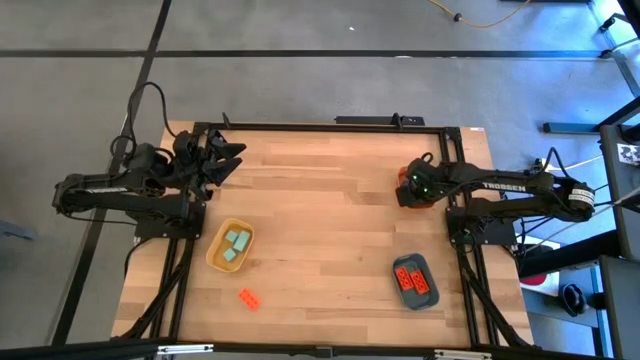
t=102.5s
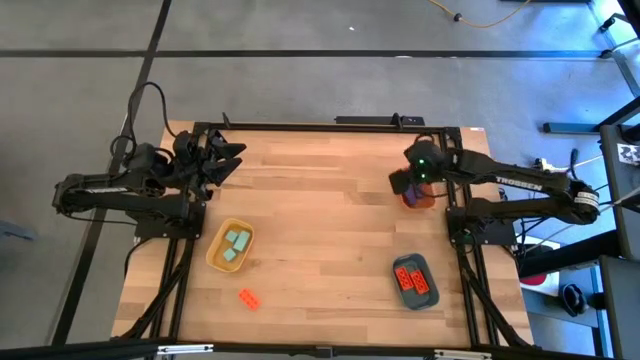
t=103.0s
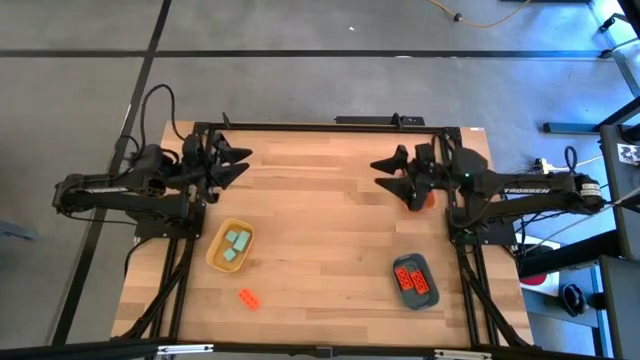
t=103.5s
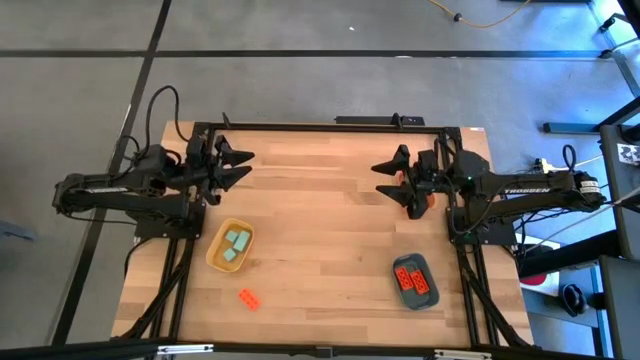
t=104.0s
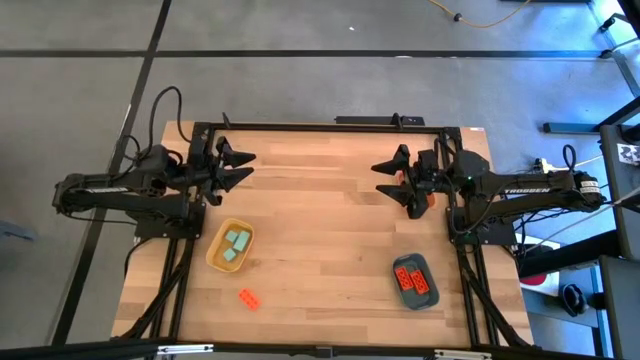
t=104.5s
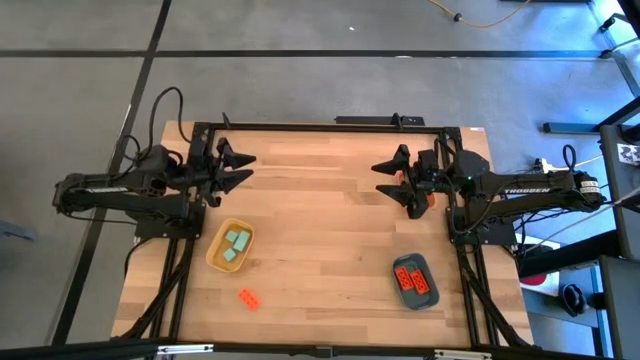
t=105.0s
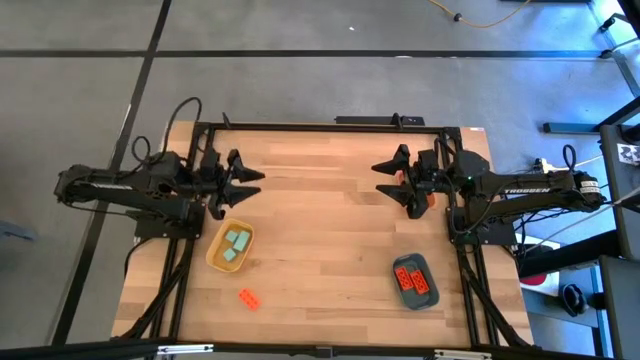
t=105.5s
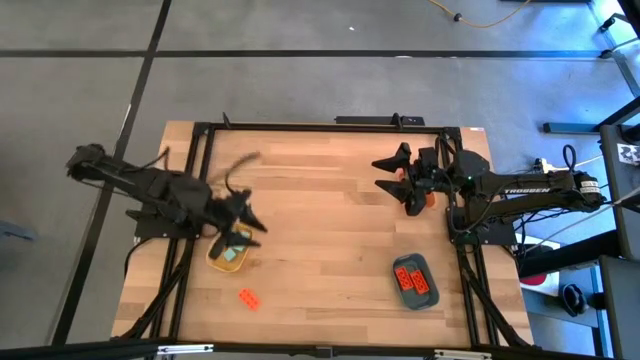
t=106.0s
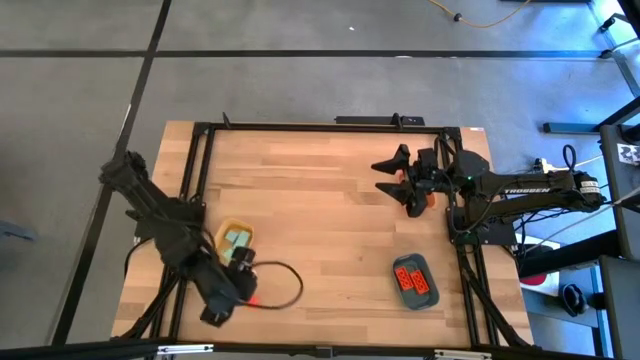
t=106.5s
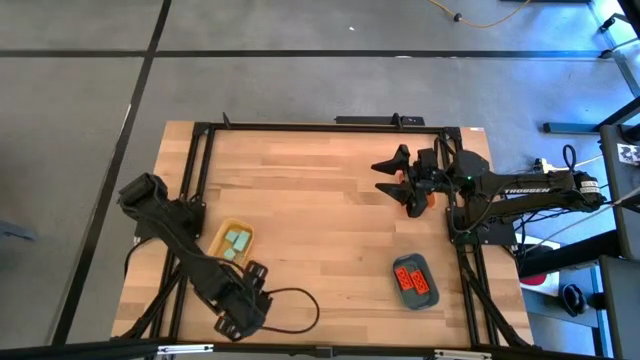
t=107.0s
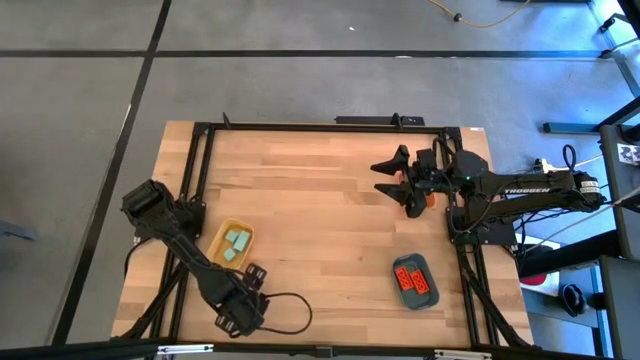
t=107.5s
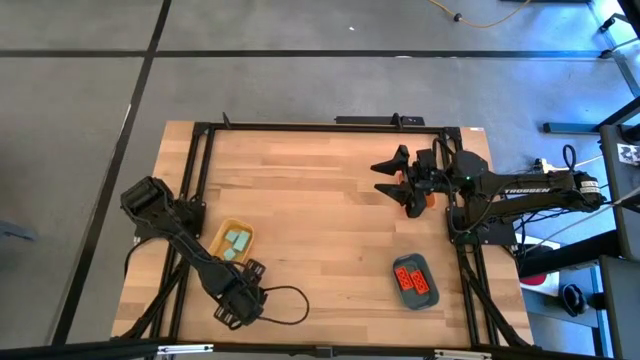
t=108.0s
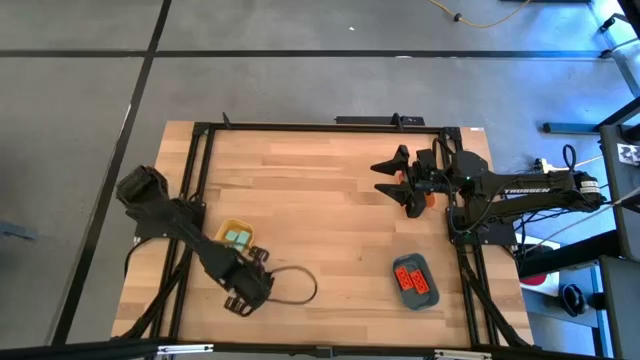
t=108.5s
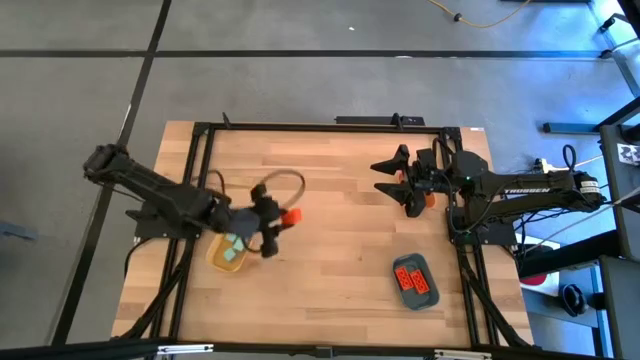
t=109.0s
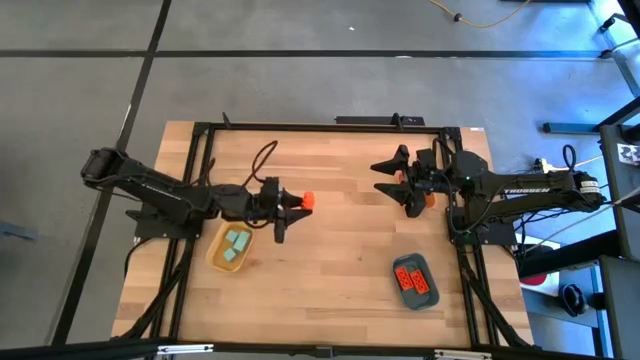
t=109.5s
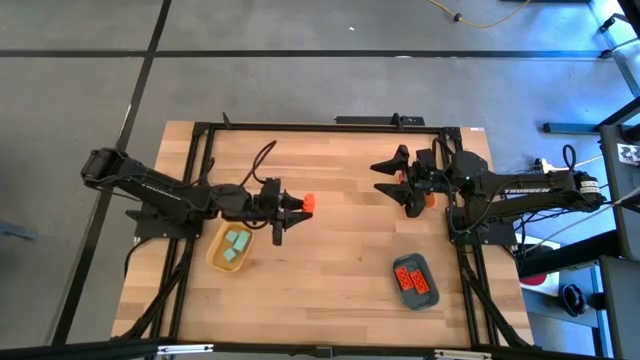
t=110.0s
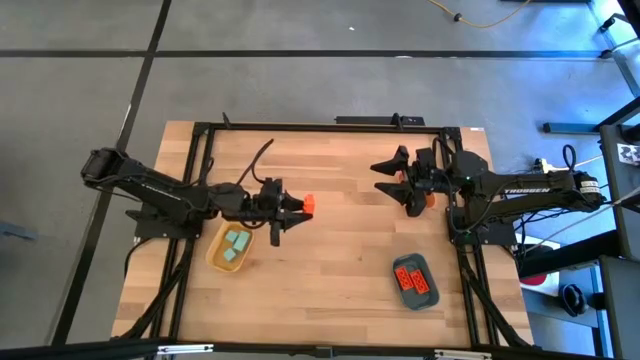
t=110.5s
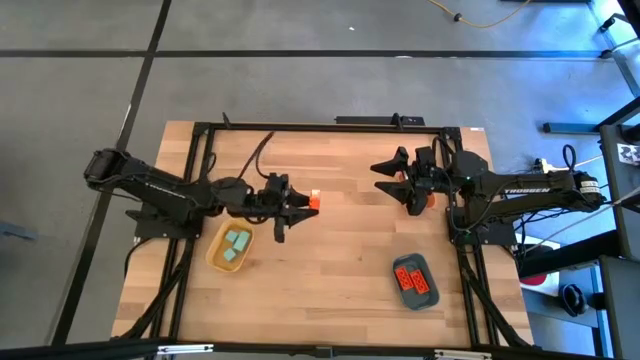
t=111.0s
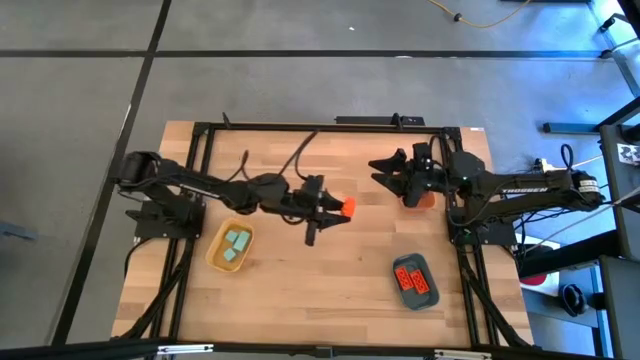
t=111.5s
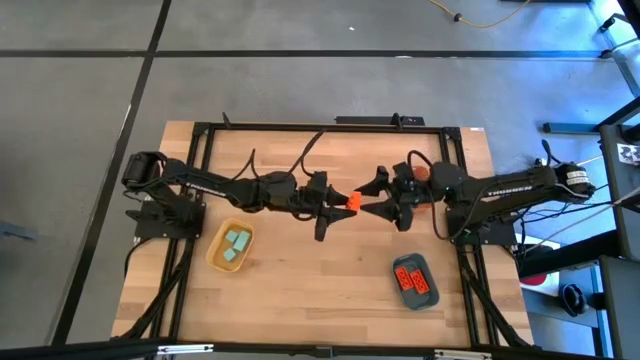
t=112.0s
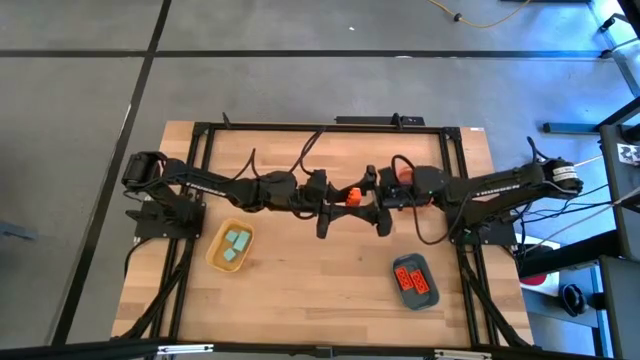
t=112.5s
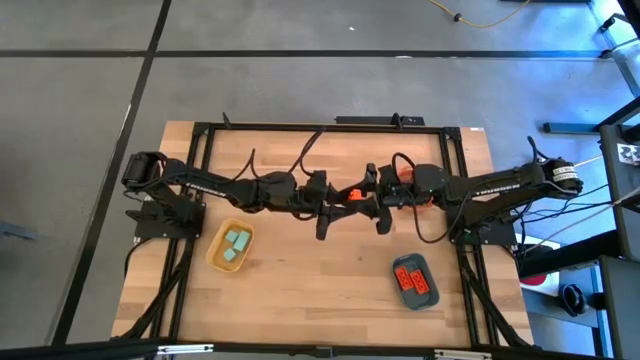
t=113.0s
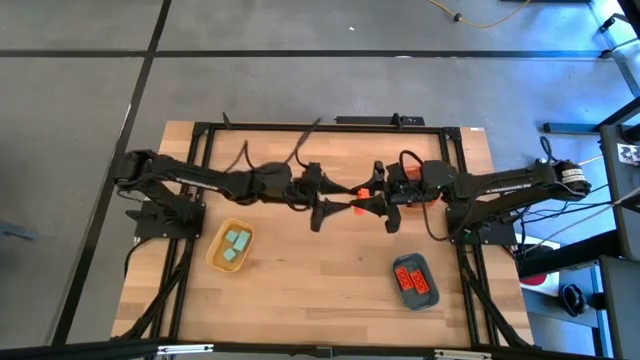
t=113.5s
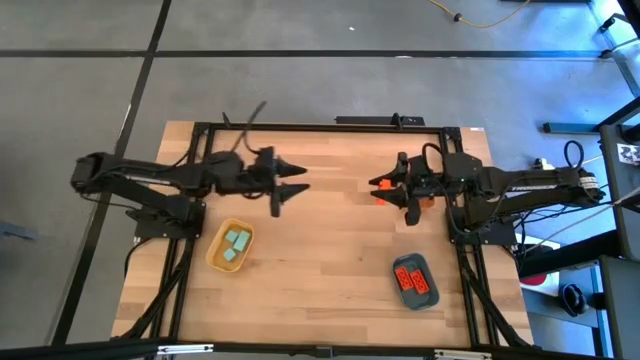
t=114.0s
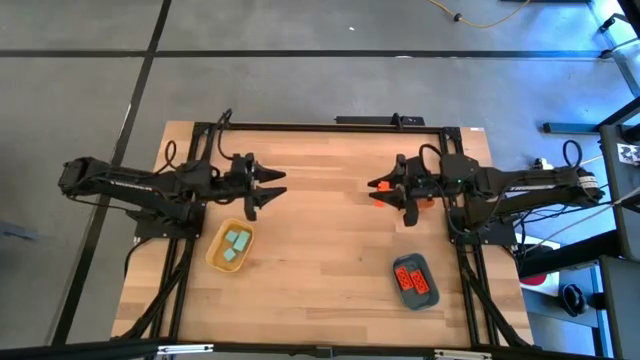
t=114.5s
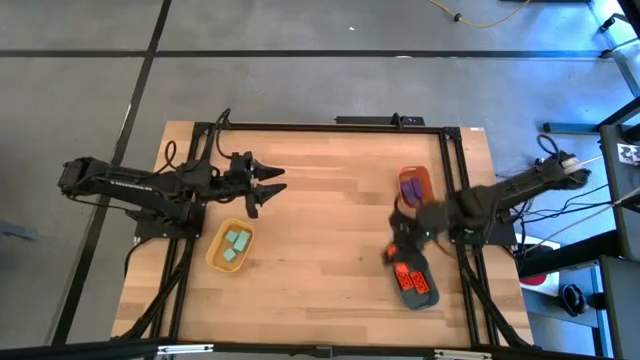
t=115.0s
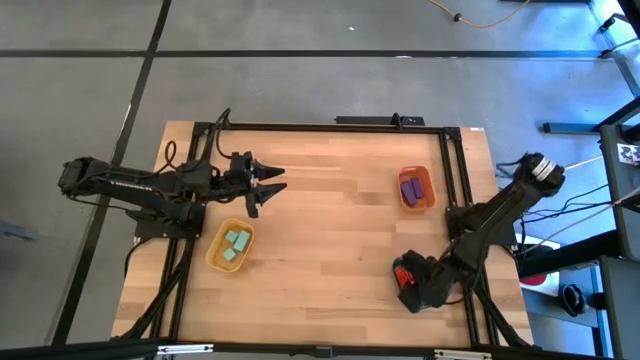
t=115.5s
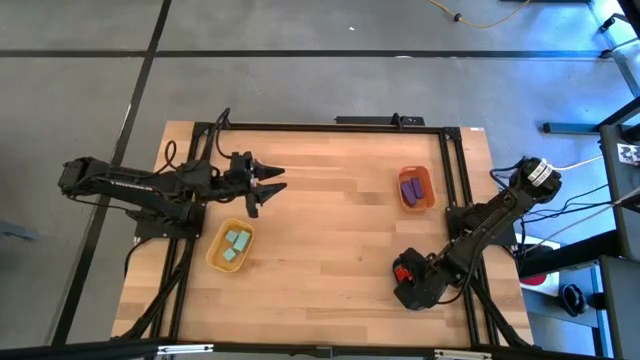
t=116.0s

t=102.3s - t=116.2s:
Task: Sort & place blocks by color
Put the orange game piece into the blue bin

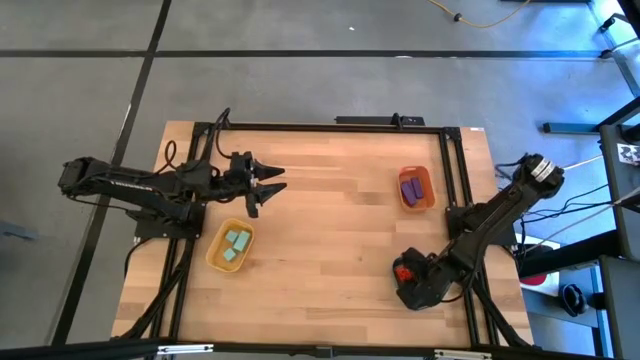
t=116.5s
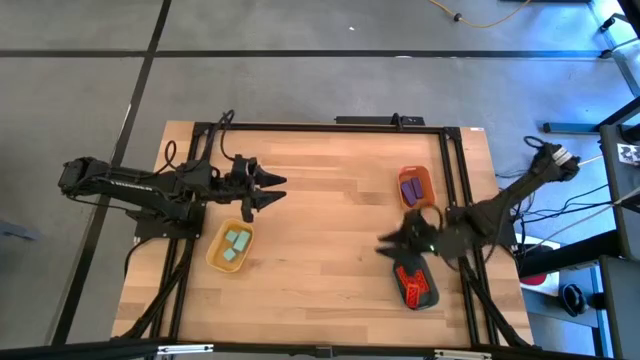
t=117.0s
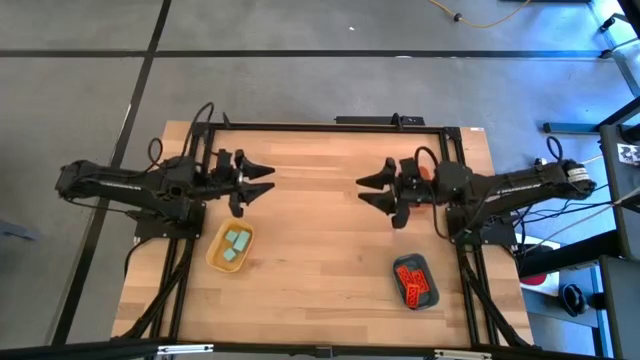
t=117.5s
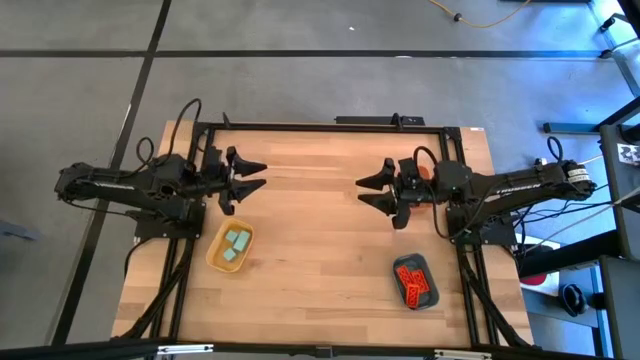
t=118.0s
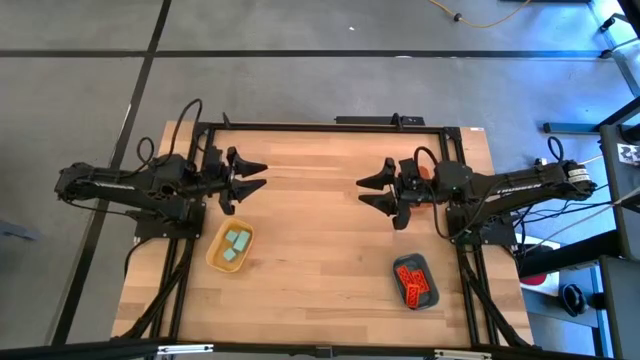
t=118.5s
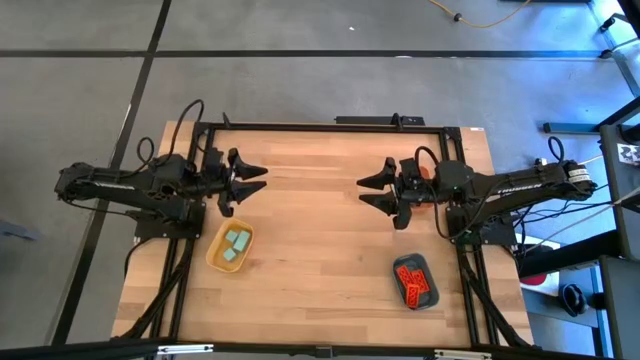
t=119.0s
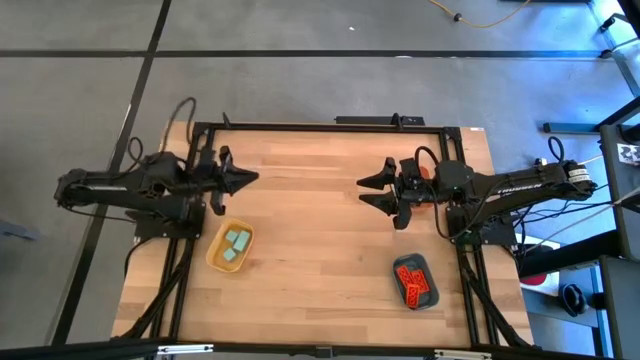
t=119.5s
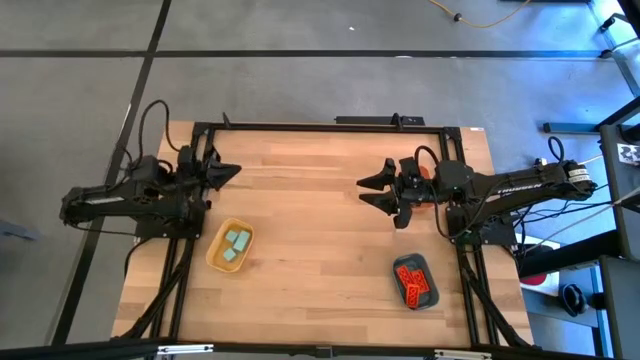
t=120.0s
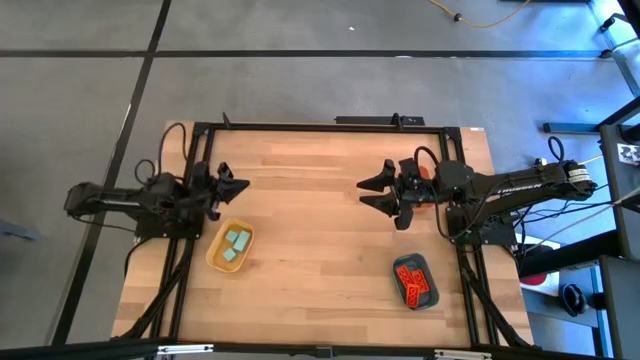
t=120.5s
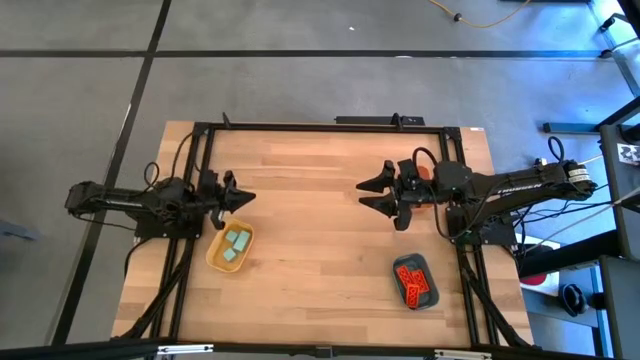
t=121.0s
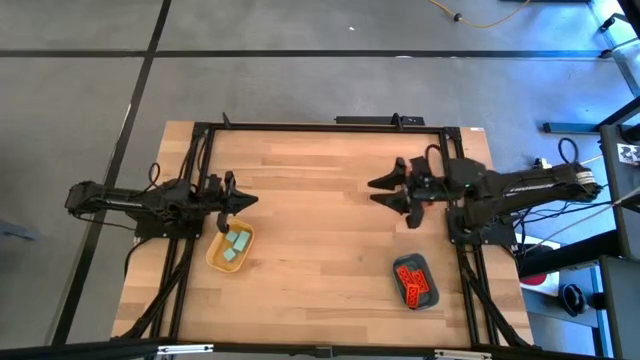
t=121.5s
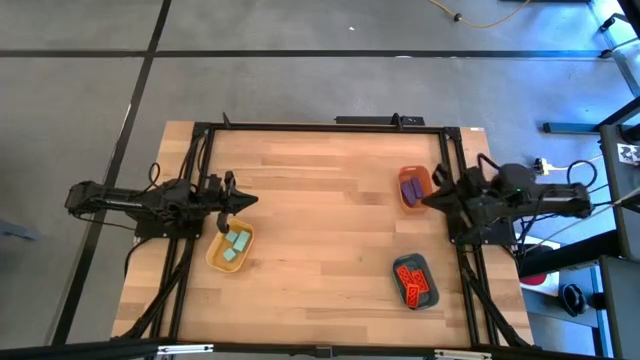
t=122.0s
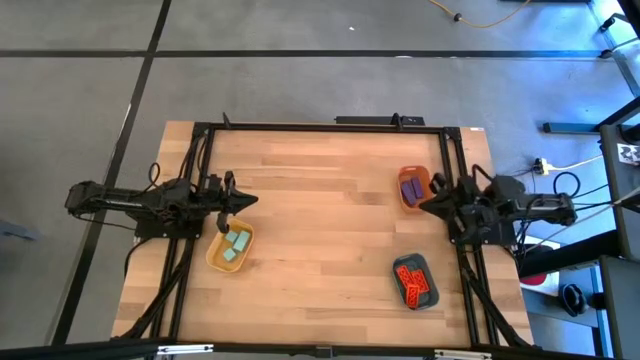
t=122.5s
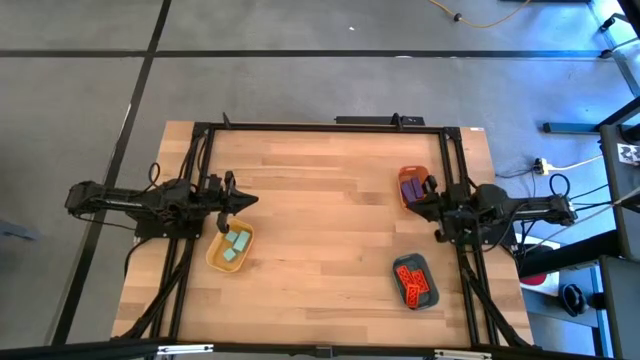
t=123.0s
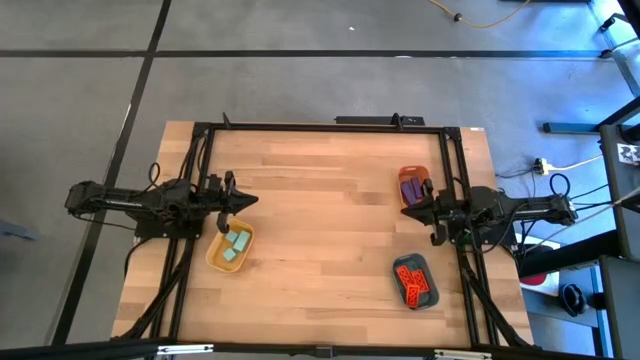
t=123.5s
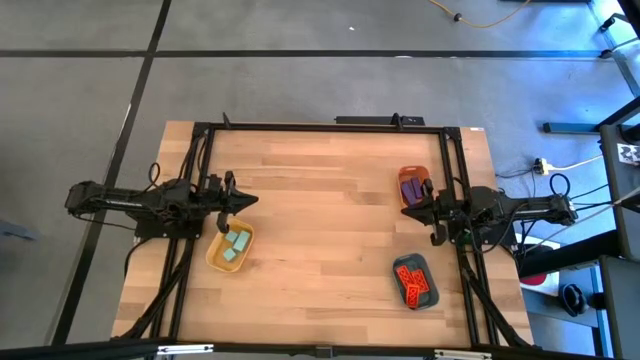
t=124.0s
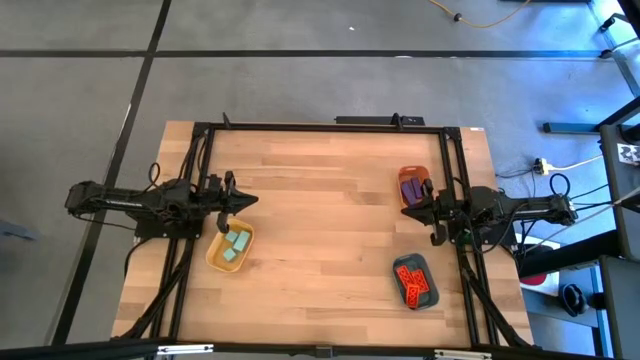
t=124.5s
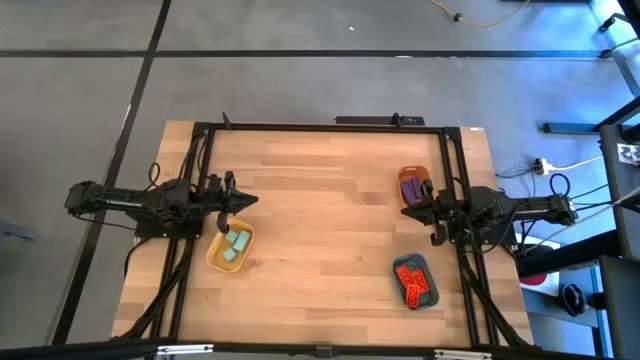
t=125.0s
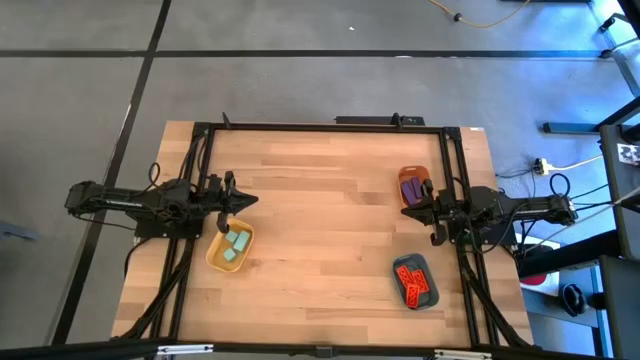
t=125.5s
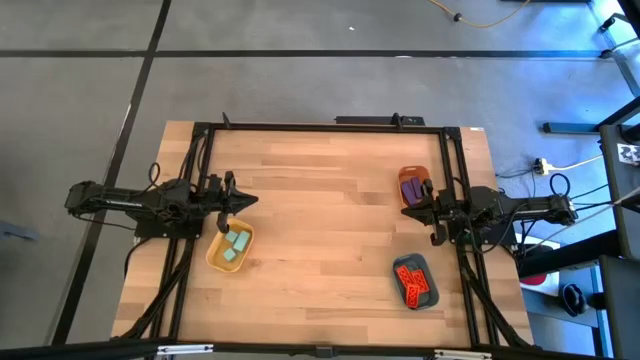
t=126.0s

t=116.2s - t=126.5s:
Return to home position
